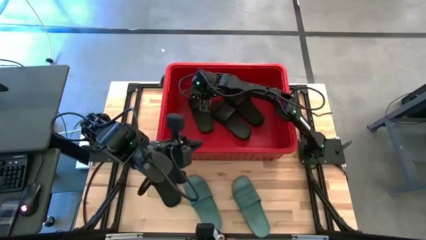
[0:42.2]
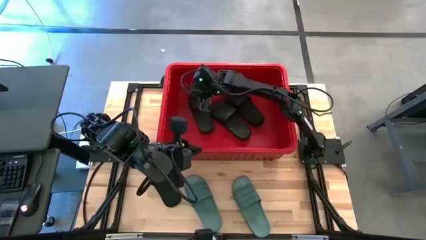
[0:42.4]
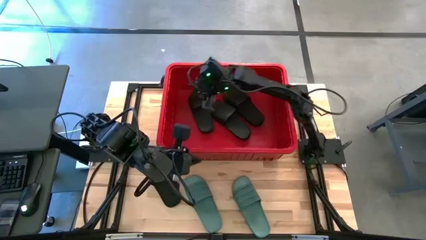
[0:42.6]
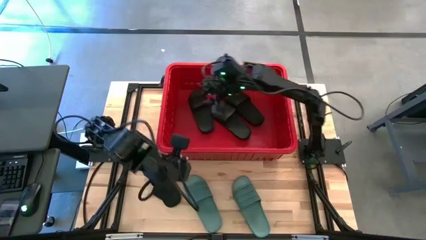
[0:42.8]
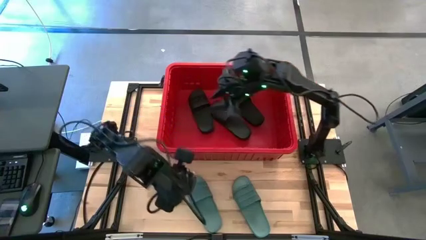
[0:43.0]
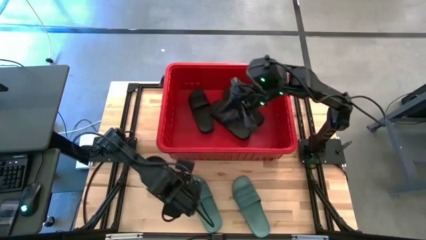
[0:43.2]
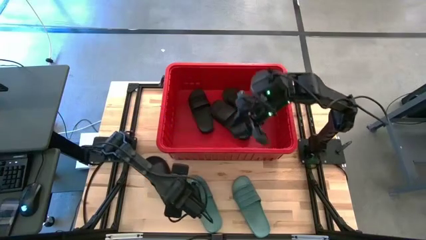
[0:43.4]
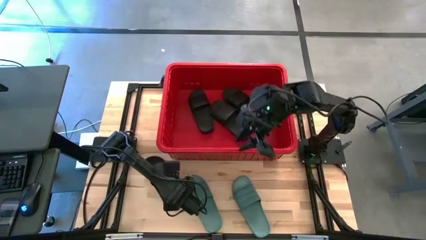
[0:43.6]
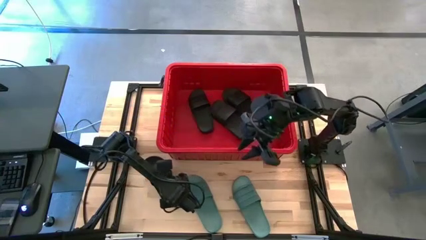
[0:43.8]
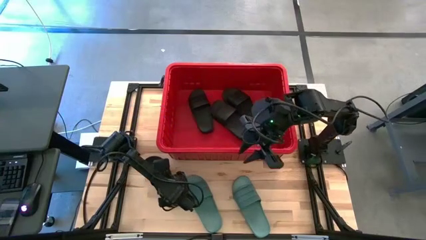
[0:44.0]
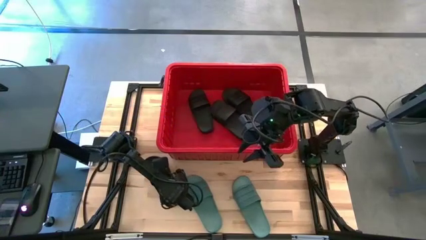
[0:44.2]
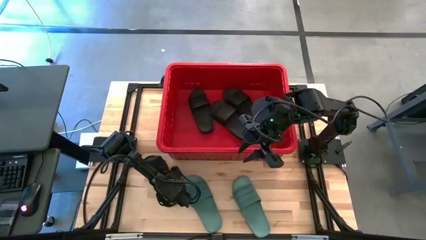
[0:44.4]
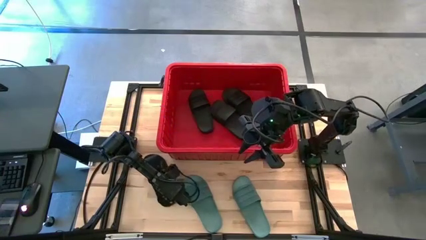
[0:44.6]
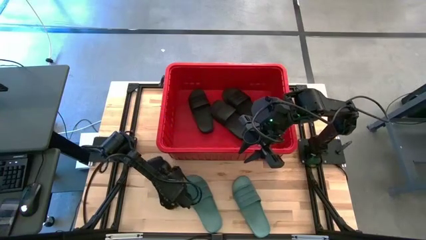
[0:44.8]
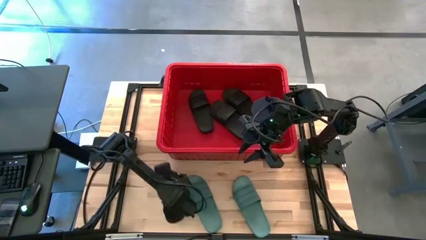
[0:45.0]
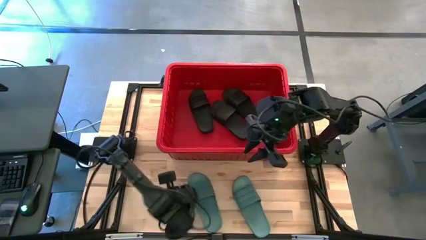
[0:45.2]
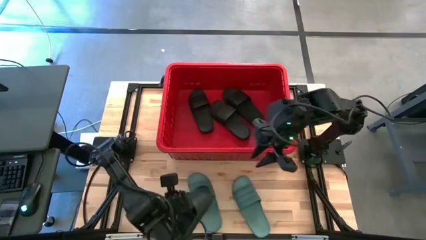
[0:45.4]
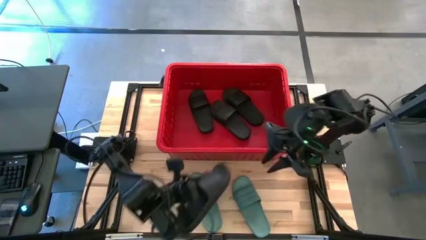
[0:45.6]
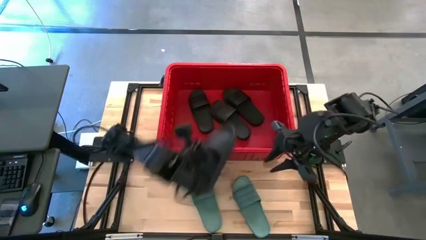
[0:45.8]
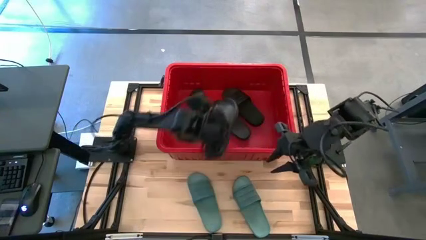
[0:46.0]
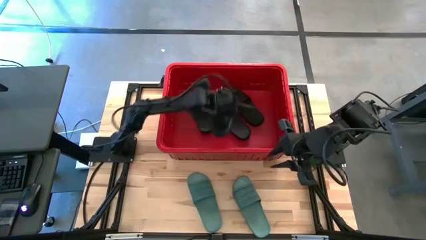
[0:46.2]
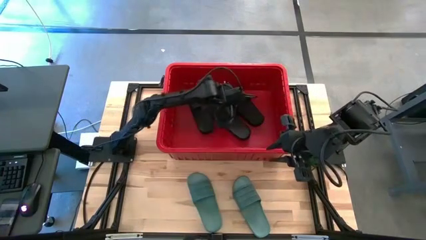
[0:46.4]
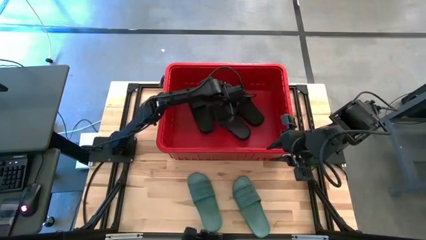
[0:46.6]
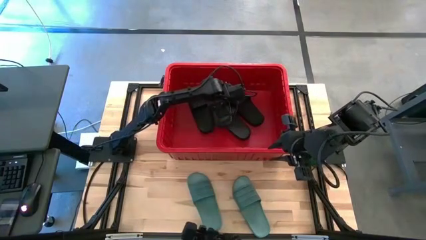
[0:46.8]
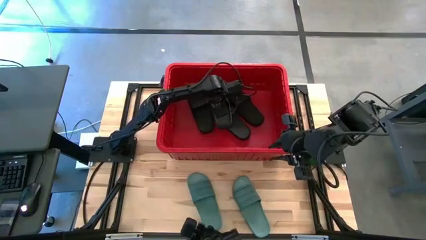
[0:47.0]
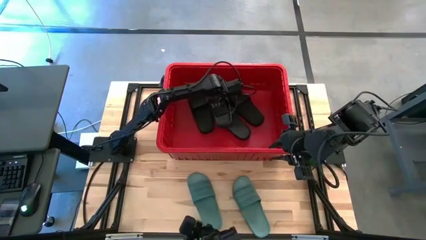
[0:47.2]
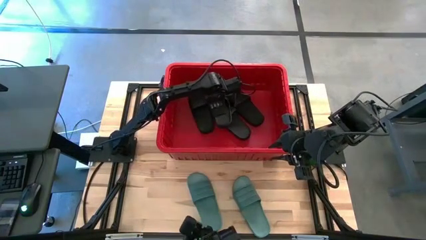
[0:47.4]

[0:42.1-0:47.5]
Task: Pick and place slides into bin
Put the black slide into the red bin

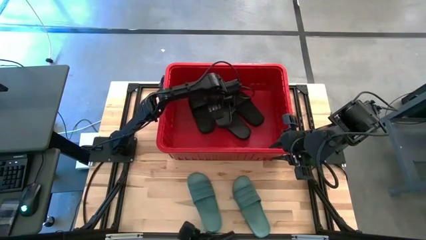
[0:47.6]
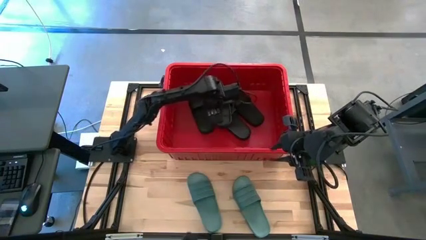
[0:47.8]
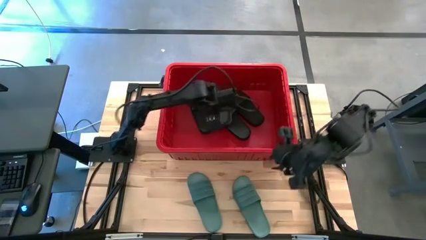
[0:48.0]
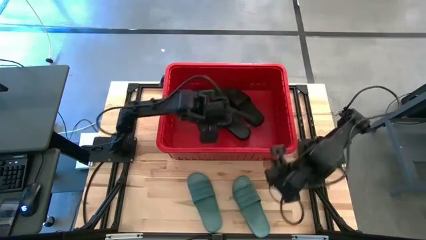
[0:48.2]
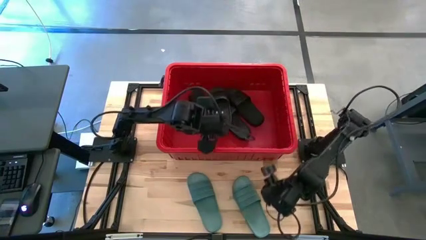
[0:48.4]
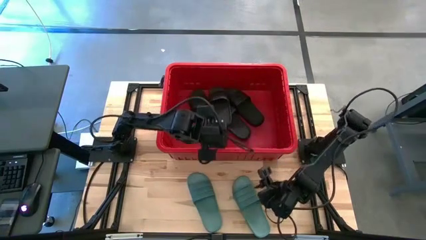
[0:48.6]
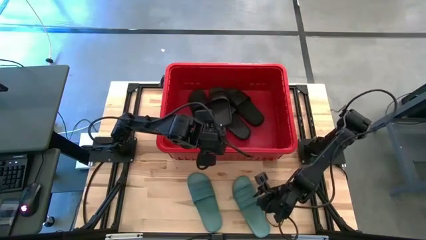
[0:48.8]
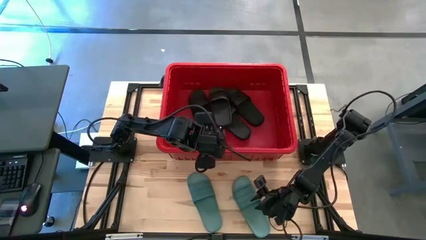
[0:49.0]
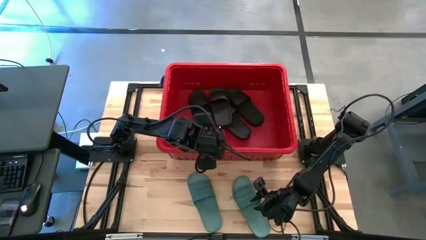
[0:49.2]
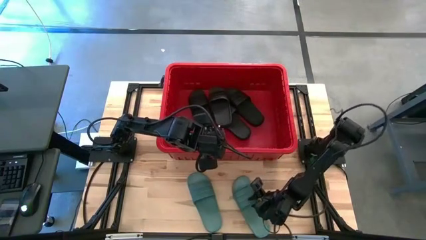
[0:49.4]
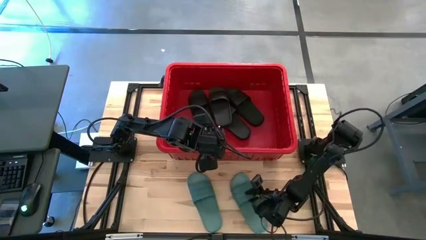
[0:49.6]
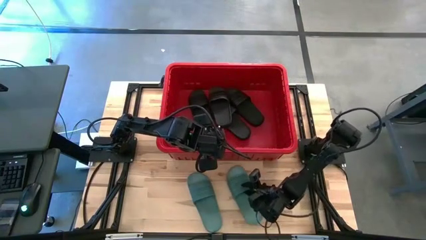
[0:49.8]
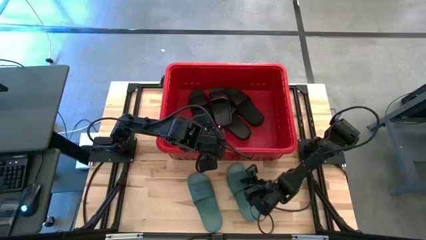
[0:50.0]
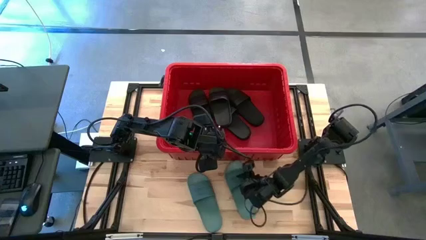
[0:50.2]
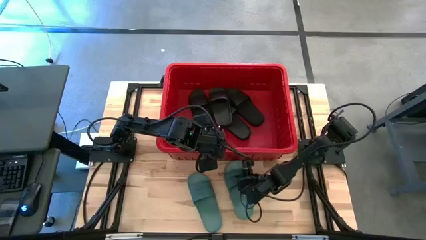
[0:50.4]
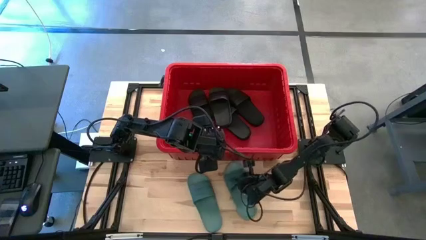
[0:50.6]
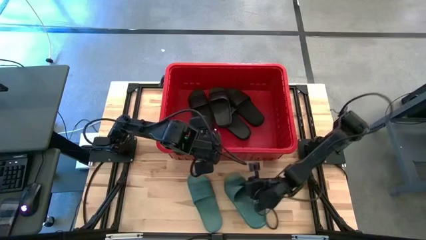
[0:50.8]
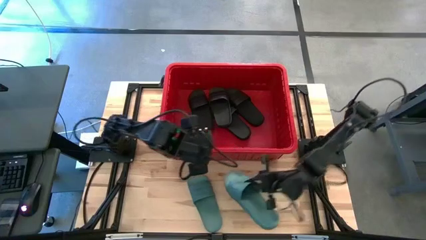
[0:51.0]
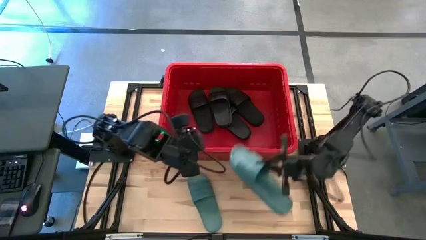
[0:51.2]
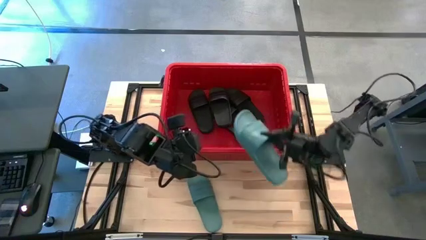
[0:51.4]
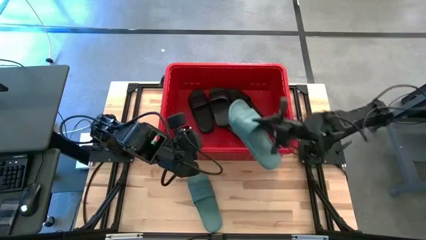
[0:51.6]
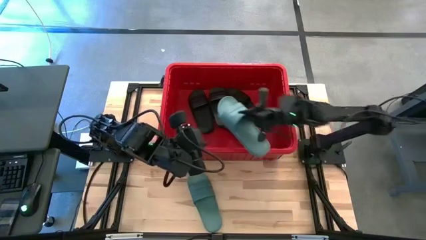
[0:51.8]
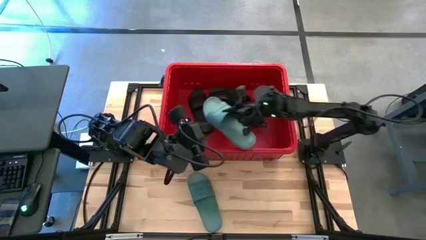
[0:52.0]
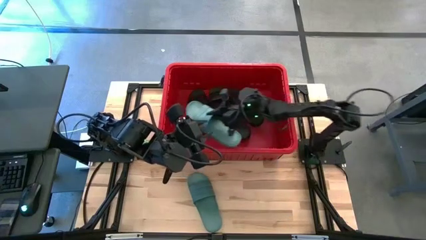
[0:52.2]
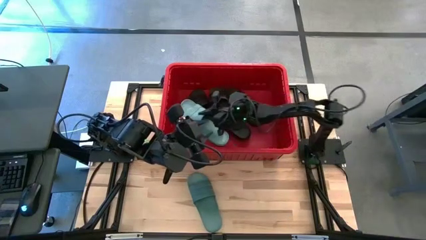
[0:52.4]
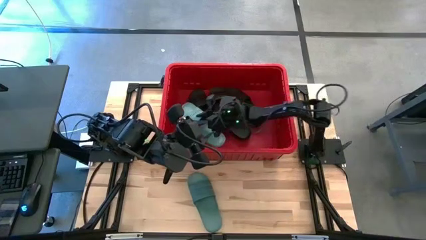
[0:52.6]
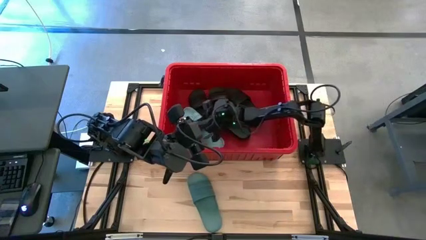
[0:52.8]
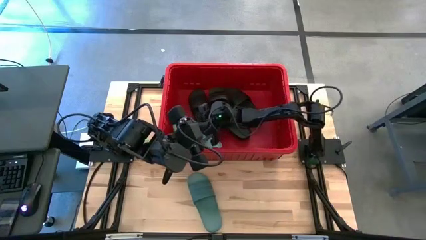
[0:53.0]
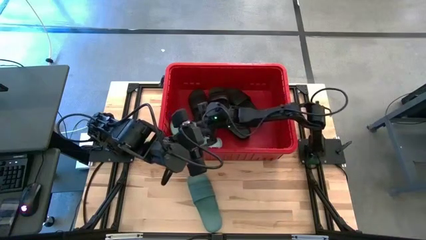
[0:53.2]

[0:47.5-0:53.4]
Put the green slide into the red bin

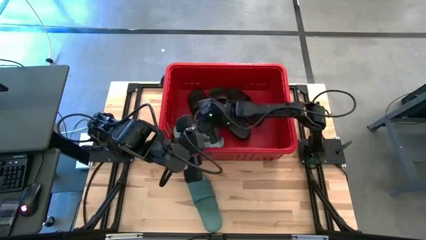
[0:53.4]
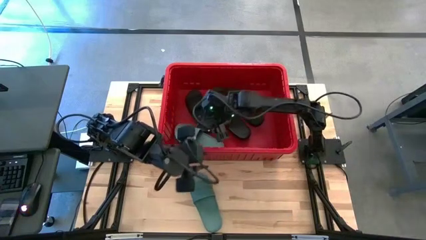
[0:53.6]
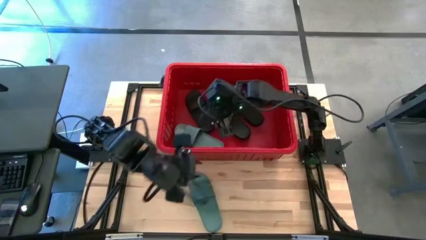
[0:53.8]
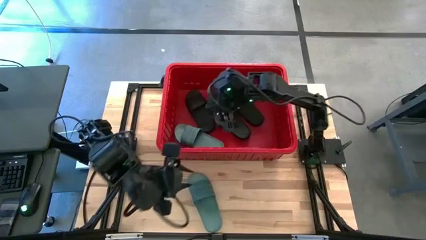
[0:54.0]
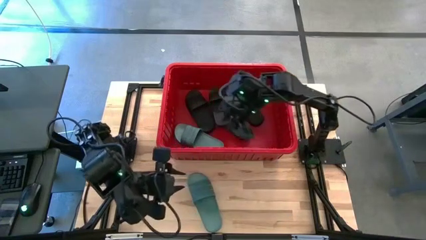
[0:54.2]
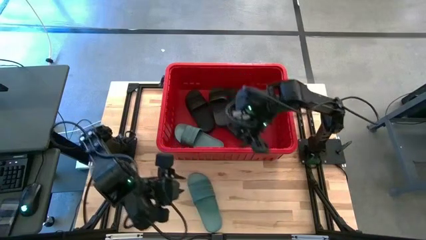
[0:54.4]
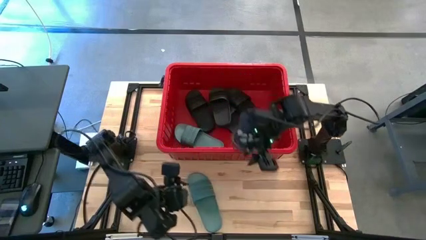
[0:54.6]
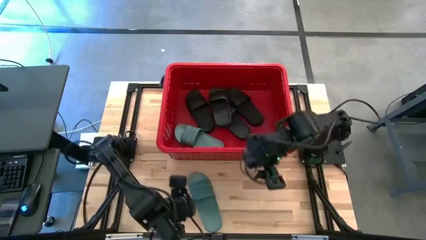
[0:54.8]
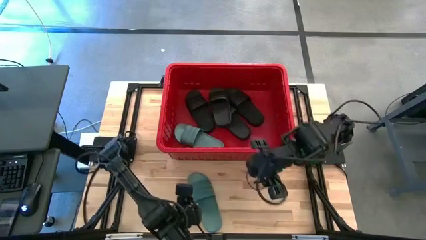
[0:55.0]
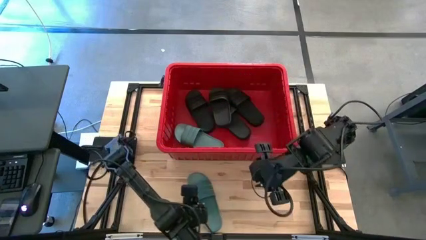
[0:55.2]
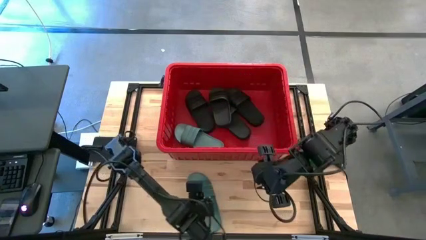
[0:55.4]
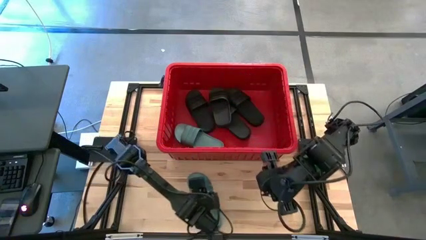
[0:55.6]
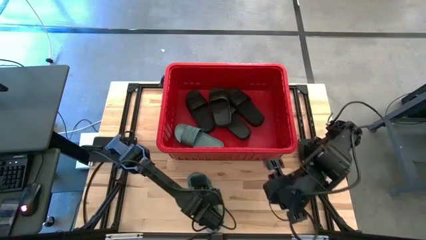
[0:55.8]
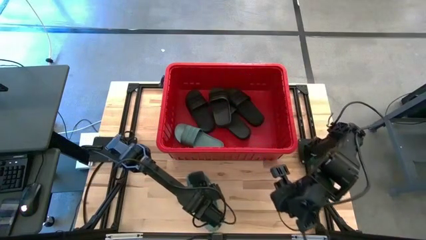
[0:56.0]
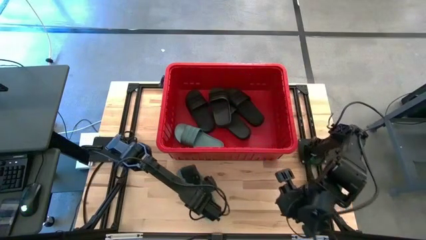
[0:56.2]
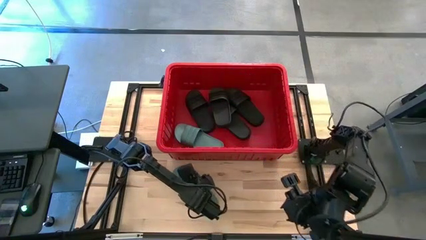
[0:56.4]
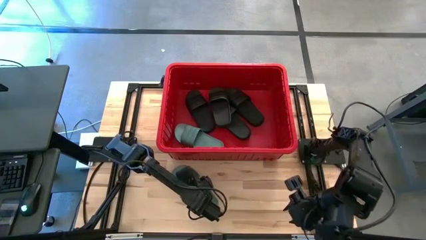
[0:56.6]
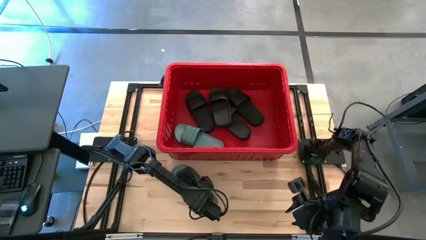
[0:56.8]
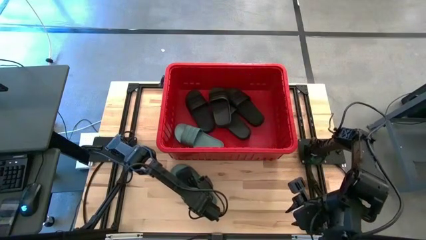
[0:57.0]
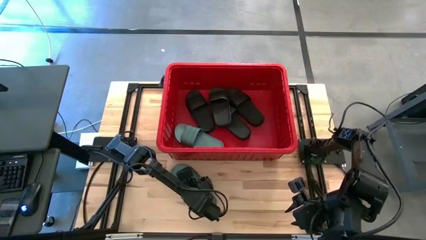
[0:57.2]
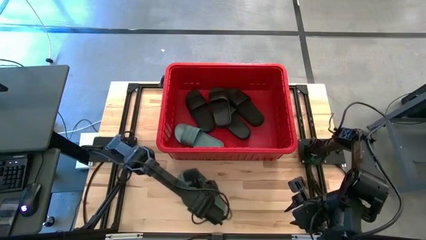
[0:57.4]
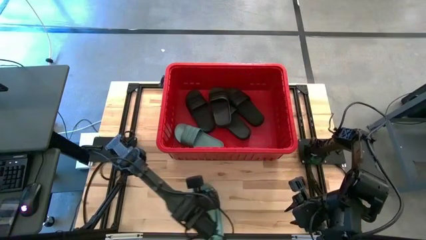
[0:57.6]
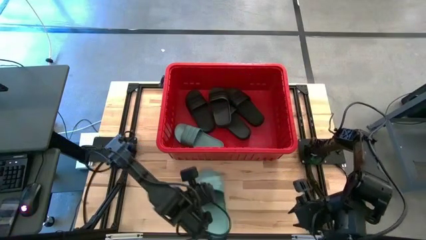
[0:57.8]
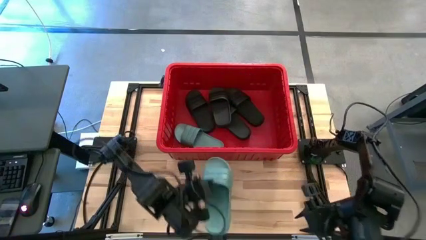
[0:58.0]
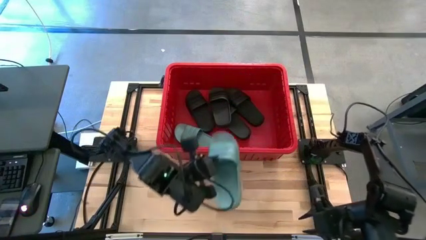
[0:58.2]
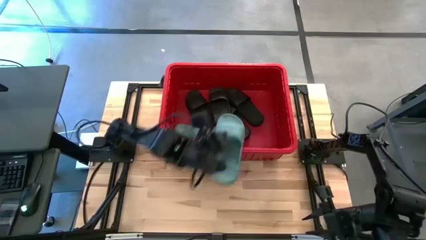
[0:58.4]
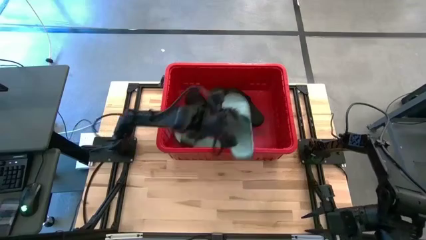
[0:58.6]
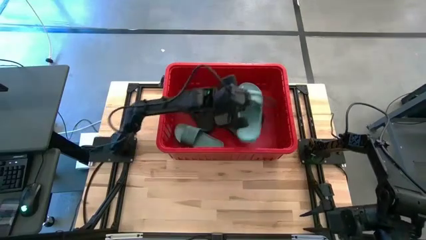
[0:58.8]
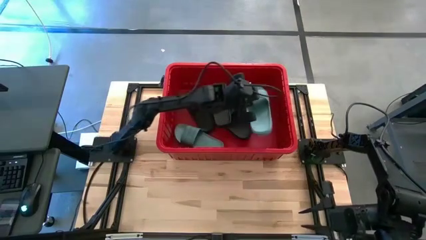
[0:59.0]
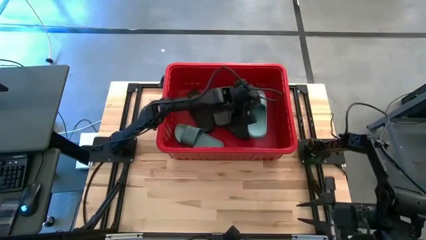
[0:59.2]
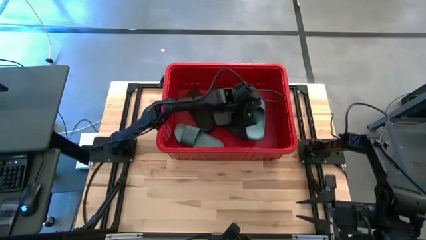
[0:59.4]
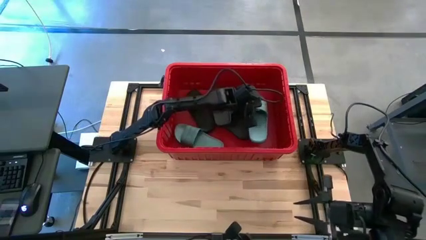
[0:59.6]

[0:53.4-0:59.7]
Put the green slide into the red bin
